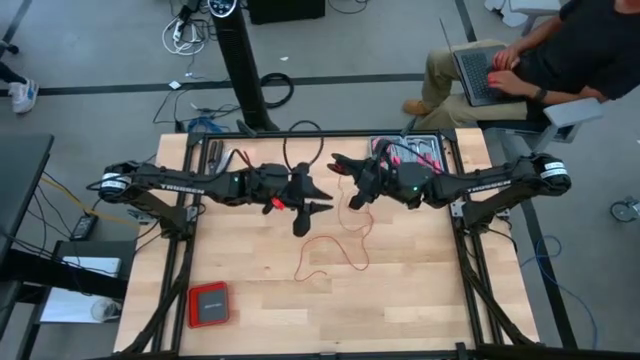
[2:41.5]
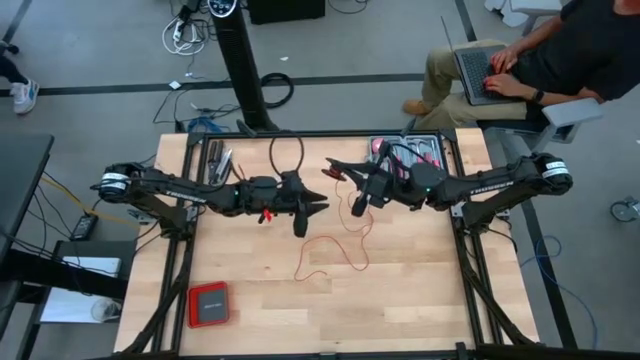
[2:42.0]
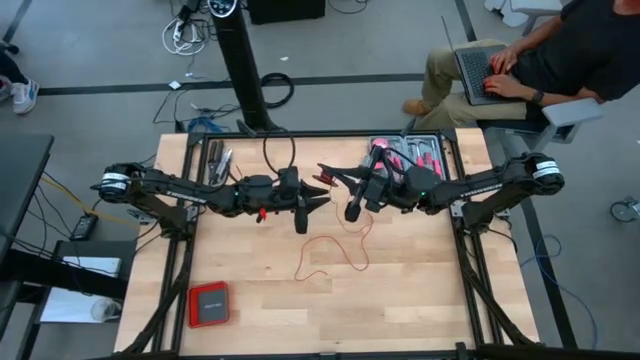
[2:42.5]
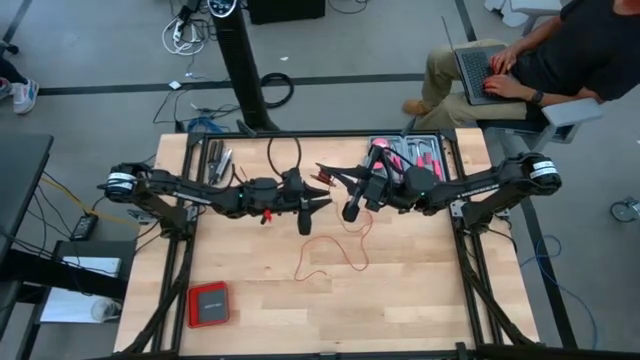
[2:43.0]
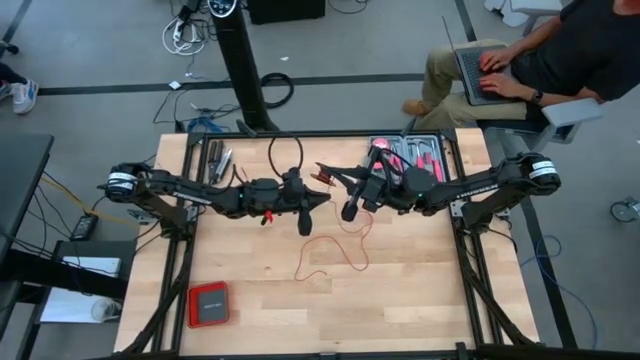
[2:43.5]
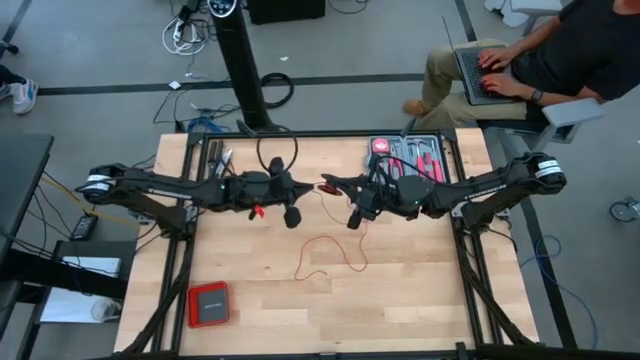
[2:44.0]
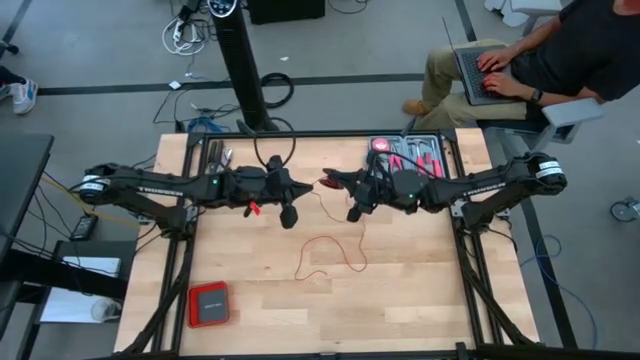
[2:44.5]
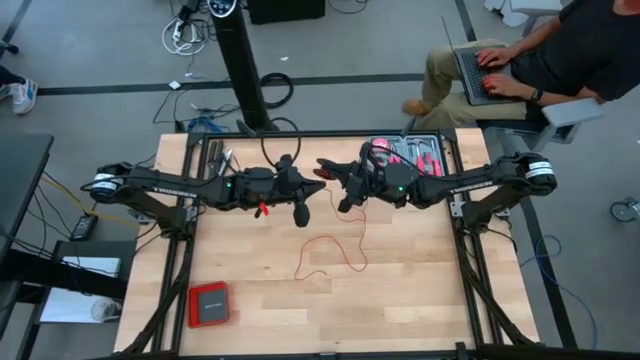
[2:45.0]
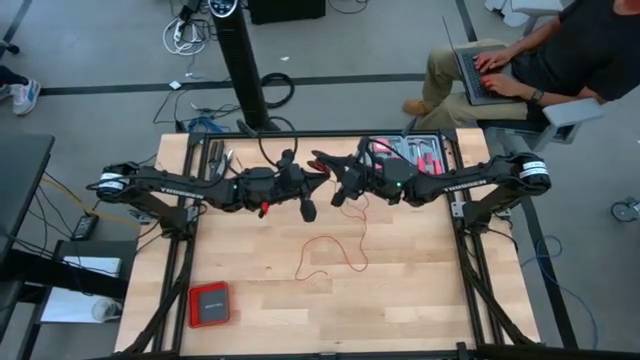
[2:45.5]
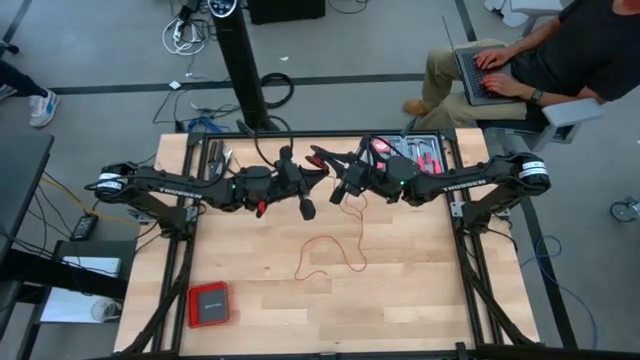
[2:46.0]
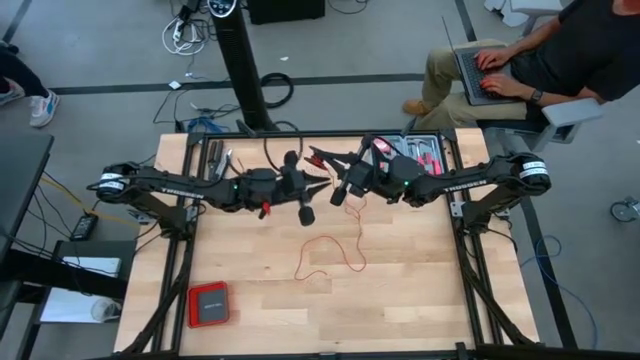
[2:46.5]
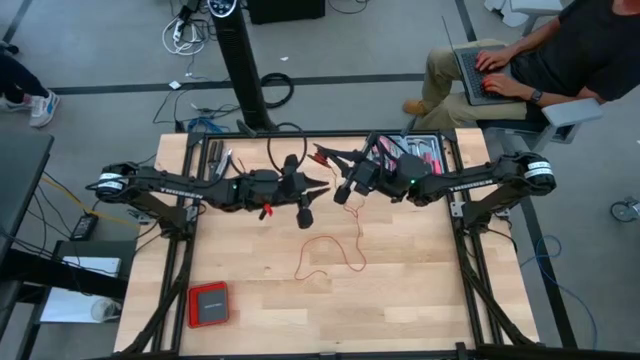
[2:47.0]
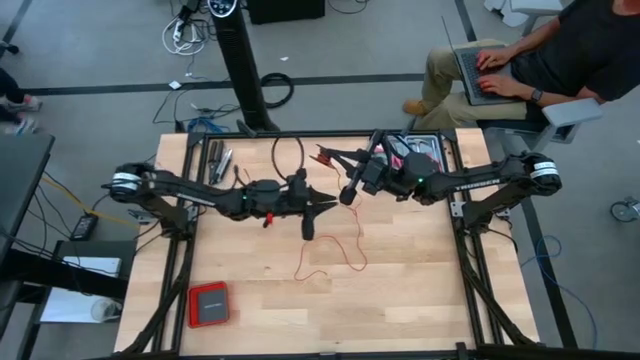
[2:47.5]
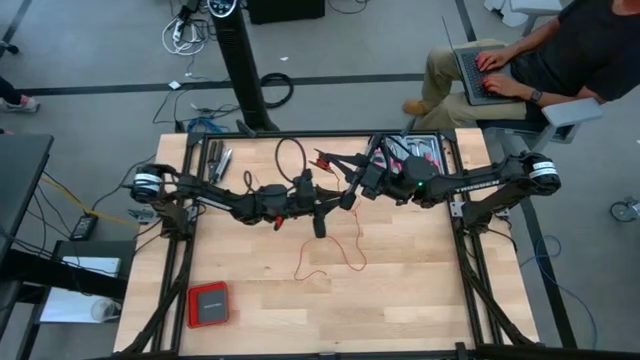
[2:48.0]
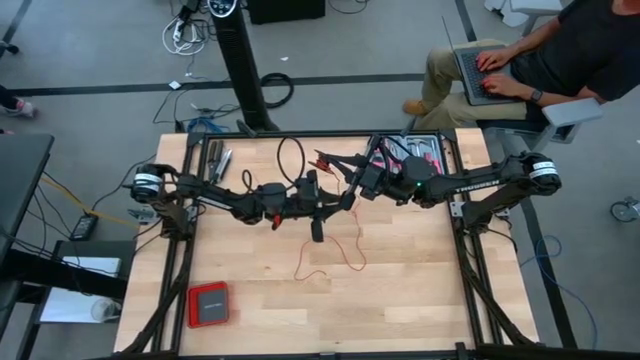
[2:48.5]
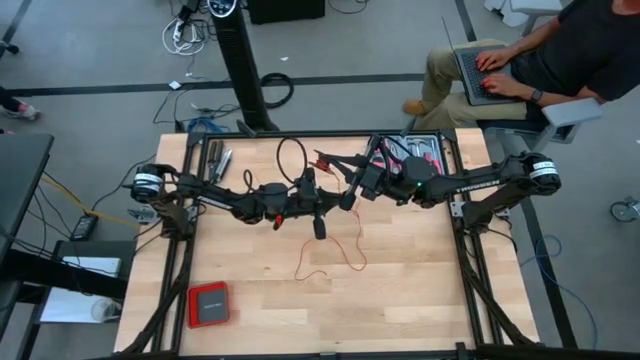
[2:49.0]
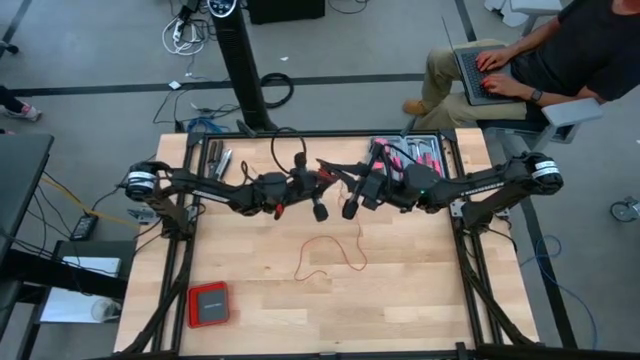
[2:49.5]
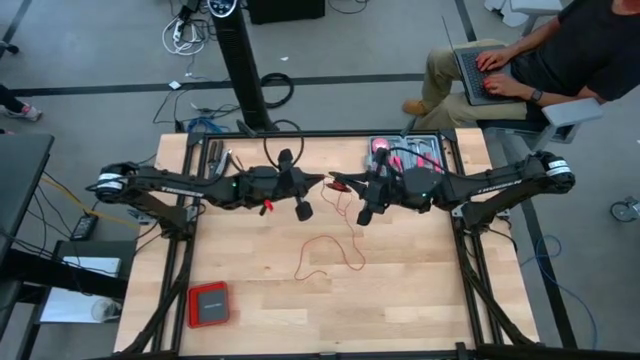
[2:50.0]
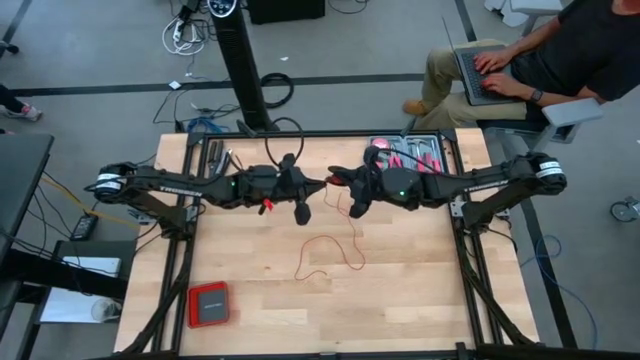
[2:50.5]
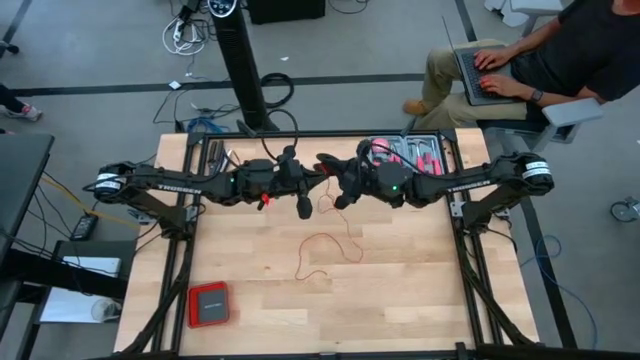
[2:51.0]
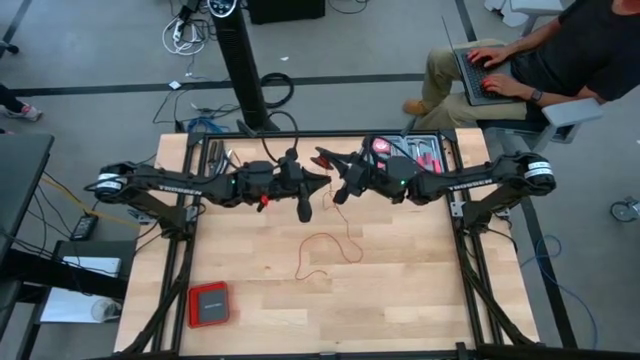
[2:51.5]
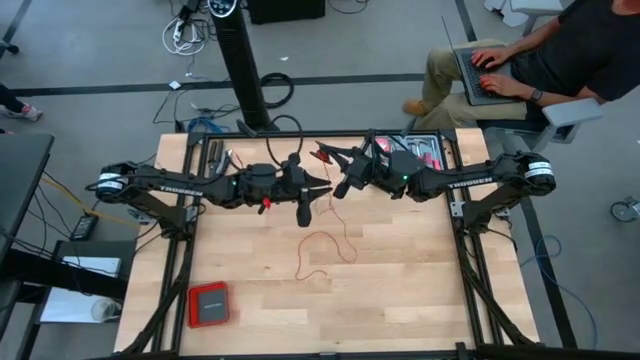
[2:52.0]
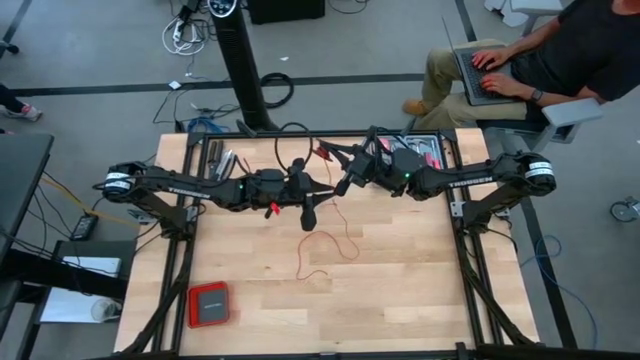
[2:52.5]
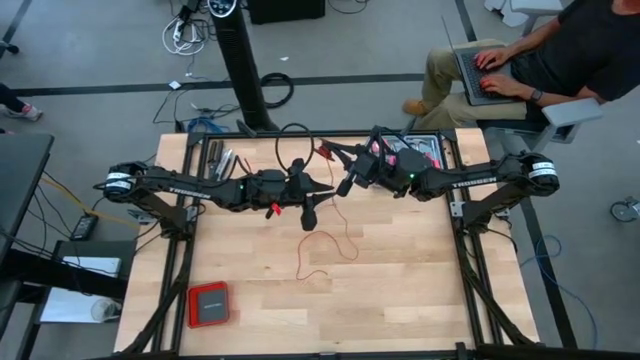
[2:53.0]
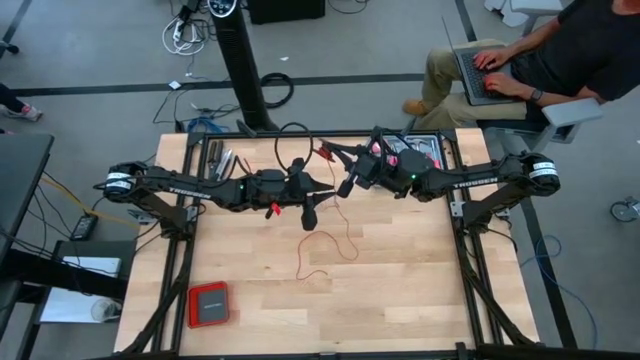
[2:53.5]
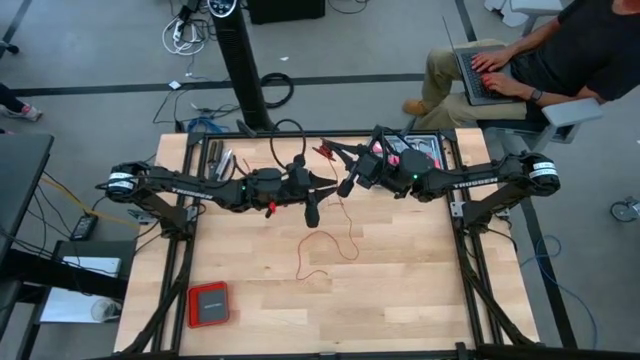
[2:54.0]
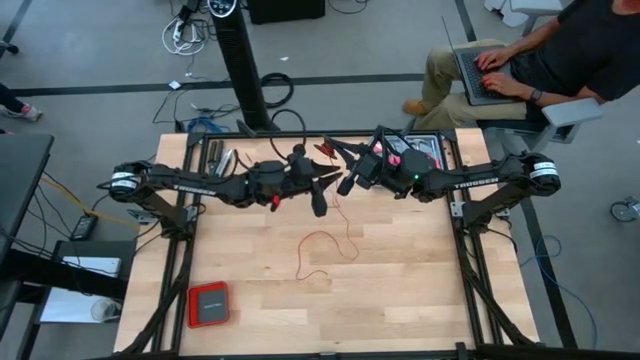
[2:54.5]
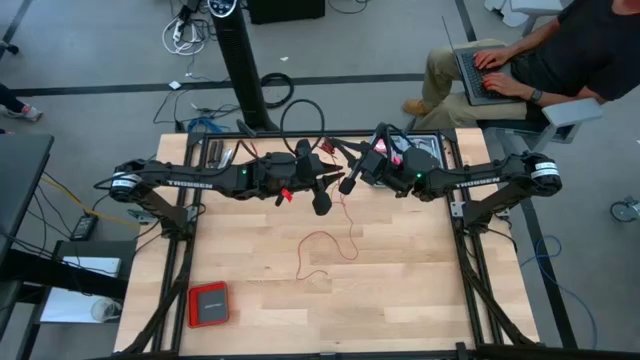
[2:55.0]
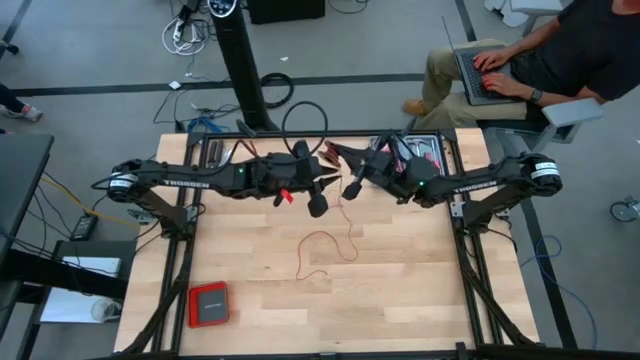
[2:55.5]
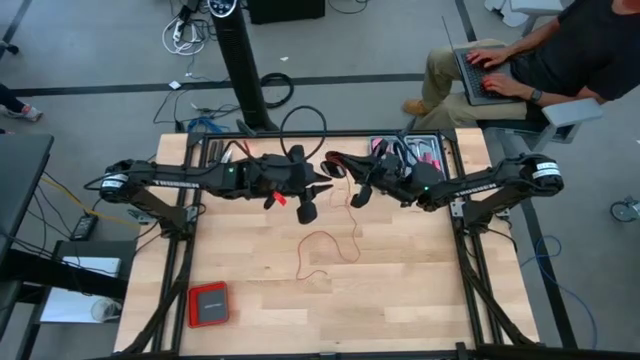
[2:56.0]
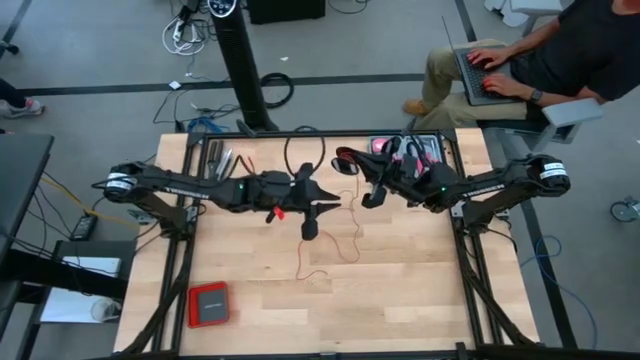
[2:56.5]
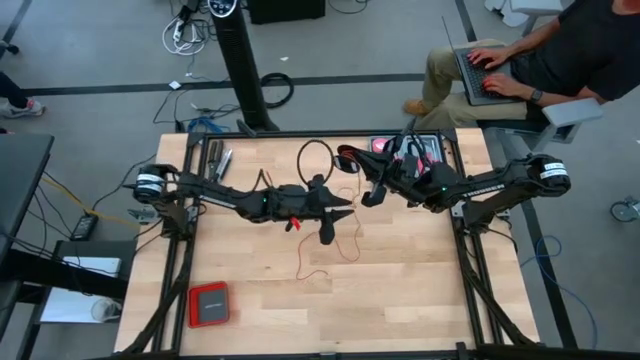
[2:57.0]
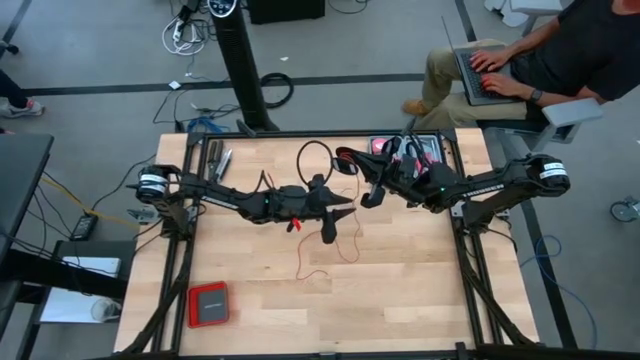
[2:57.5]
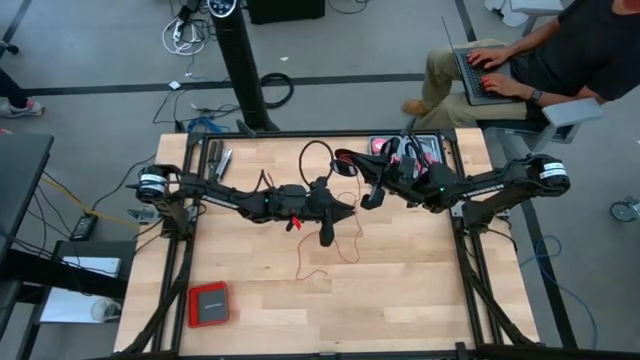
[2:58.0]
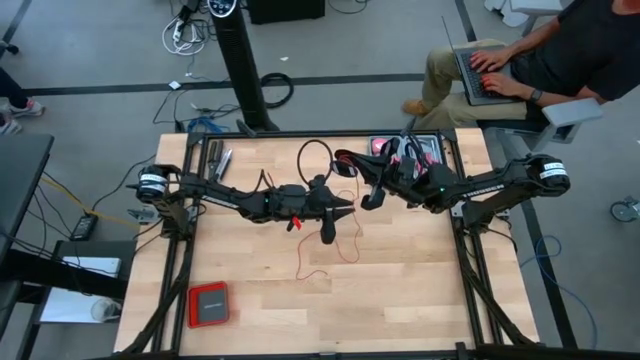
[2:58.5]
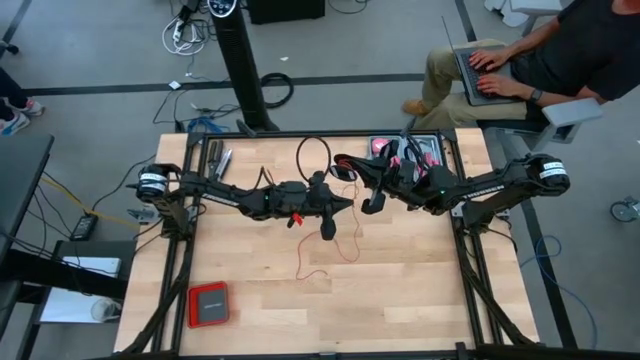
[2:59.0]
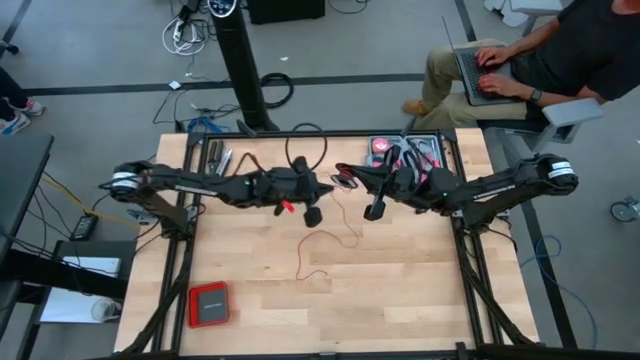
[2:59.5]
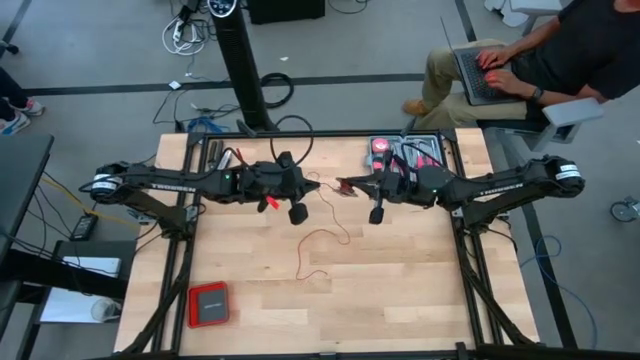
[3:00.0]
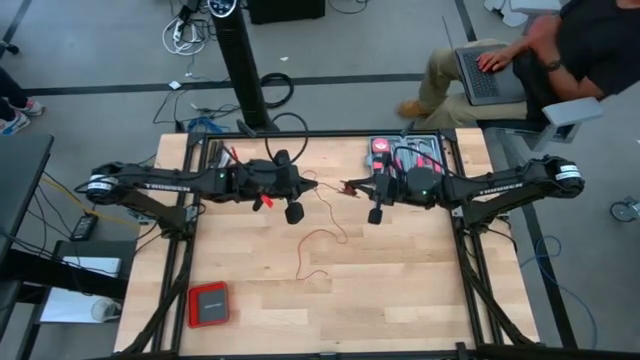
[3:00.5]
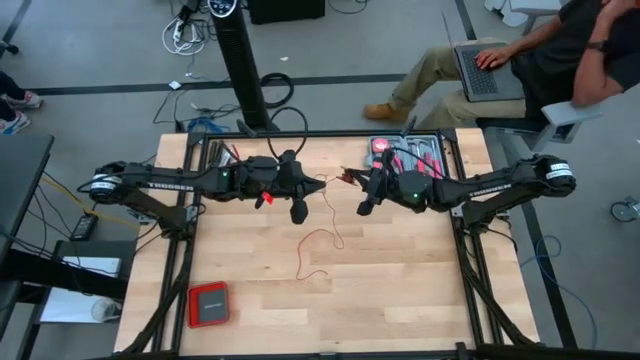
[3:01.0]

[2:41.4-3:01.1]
Task: Coil cords
Coil the red cable wire onto the black spool

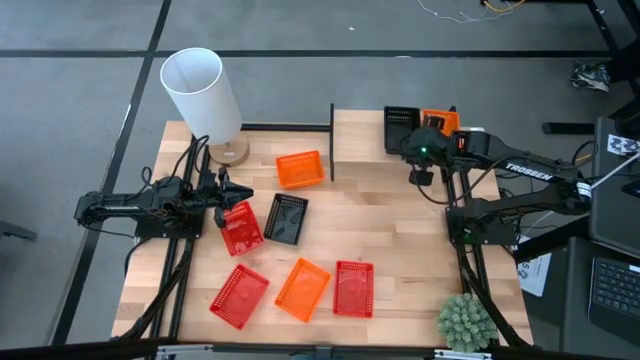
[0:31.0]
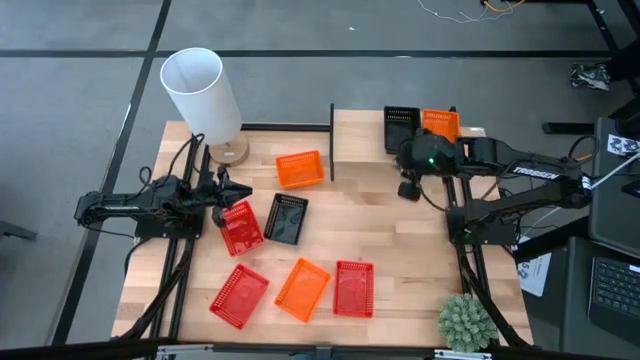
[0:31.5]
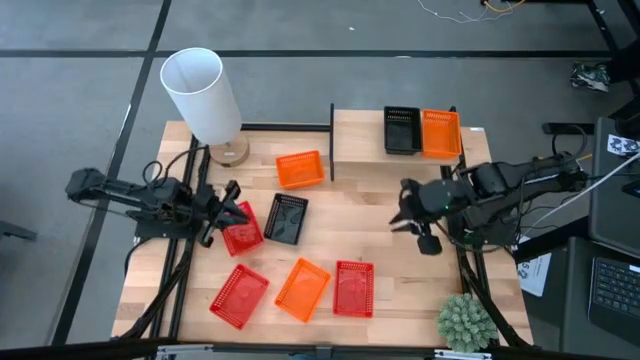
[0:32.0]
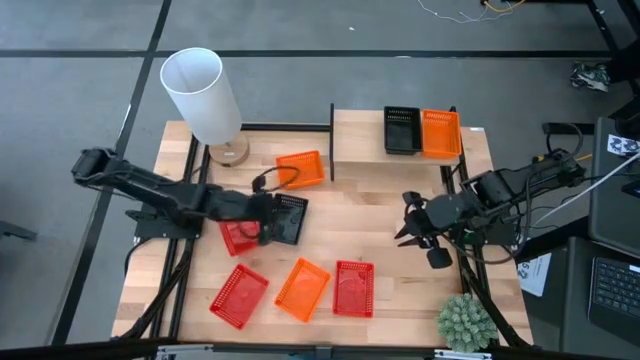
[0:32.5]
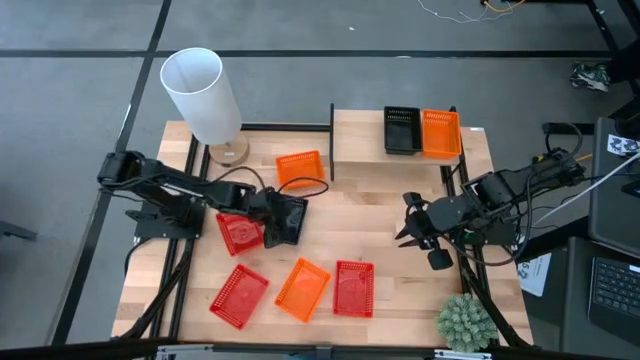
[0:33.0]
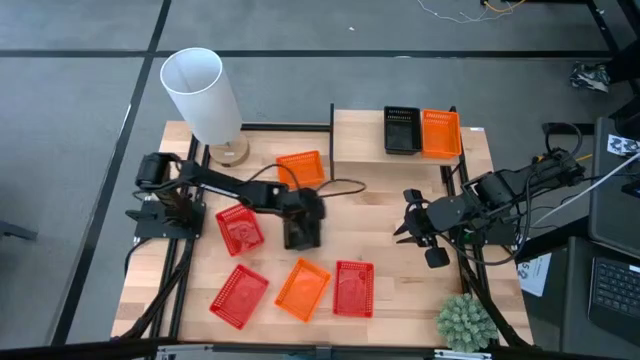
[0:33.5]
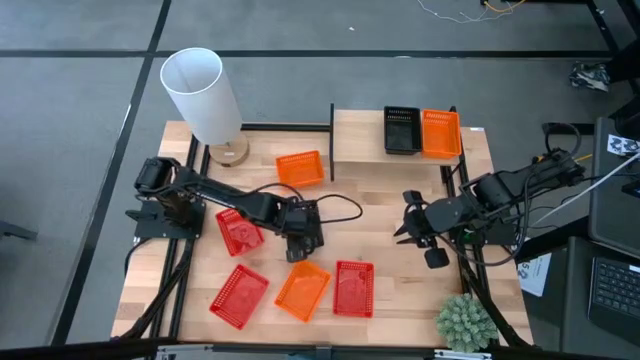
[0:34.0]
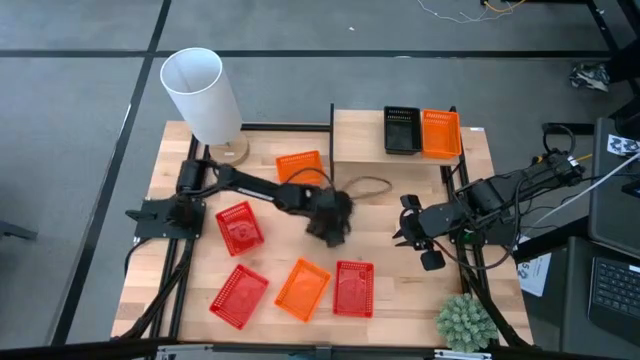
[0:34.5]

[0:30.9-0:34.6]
Task: Stack baskets on shelf by color
Adjust the black bin
